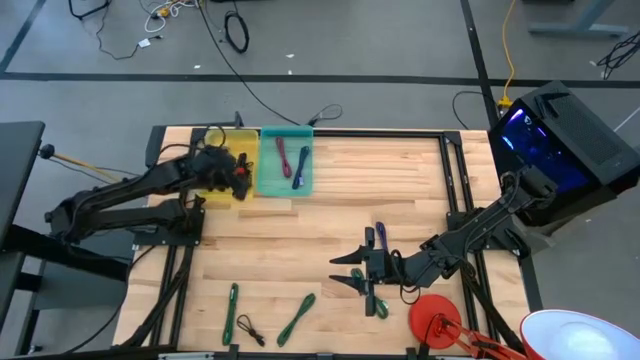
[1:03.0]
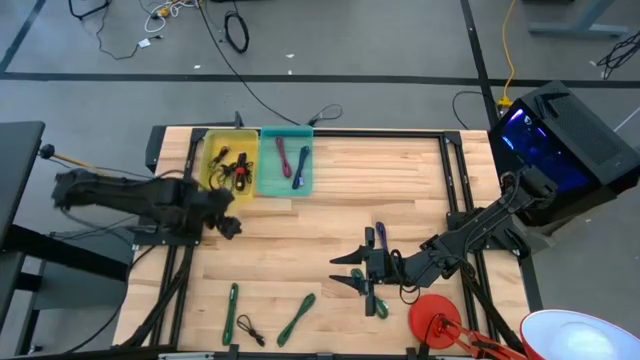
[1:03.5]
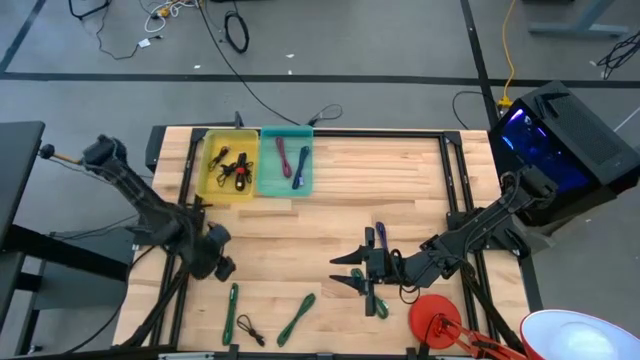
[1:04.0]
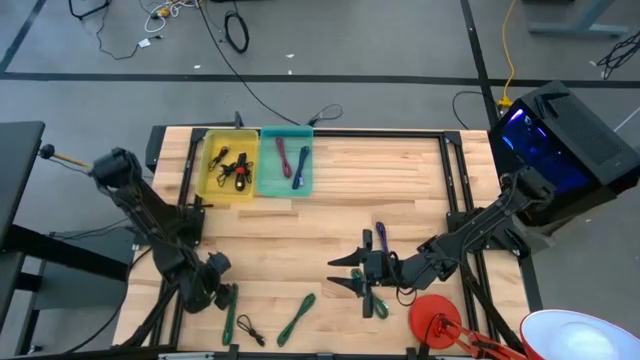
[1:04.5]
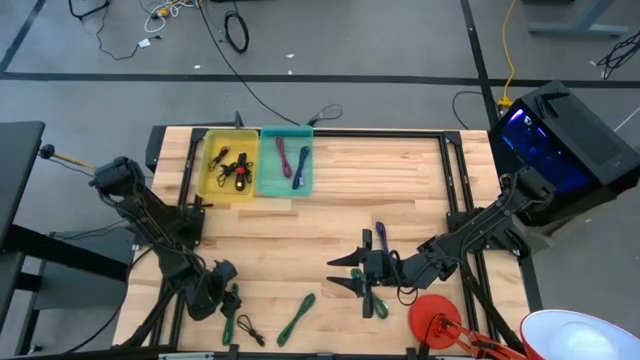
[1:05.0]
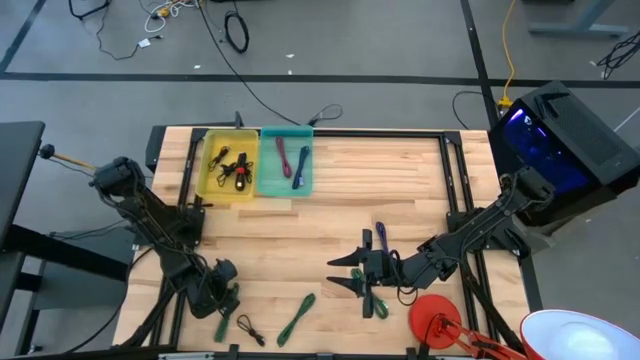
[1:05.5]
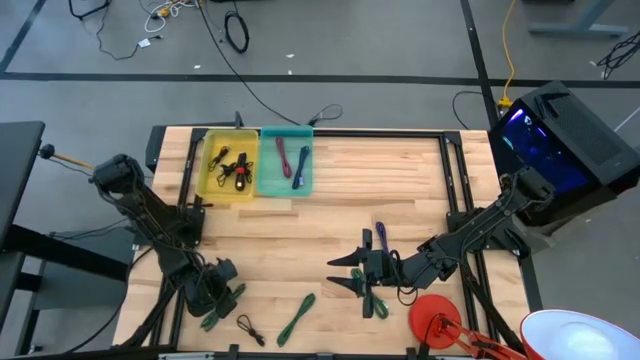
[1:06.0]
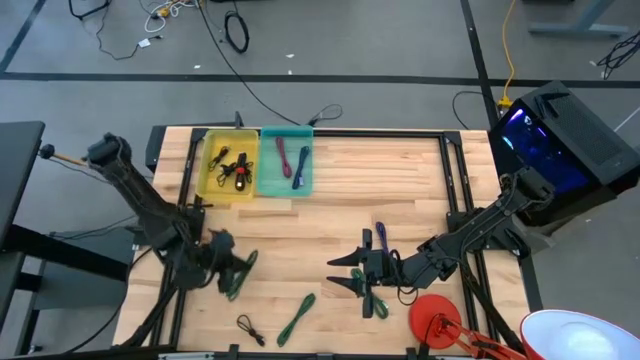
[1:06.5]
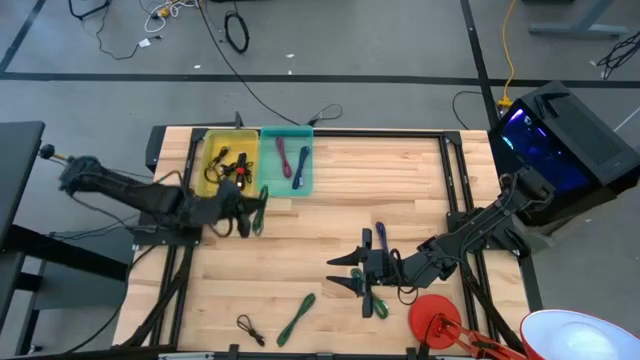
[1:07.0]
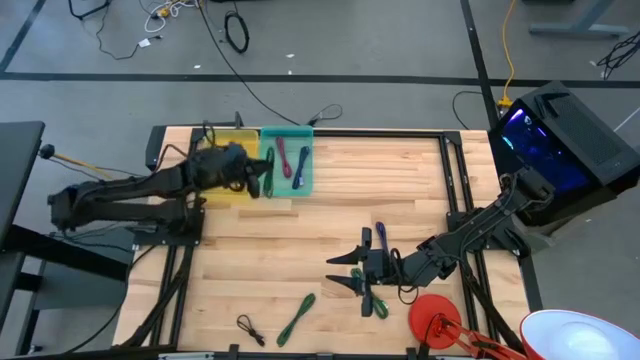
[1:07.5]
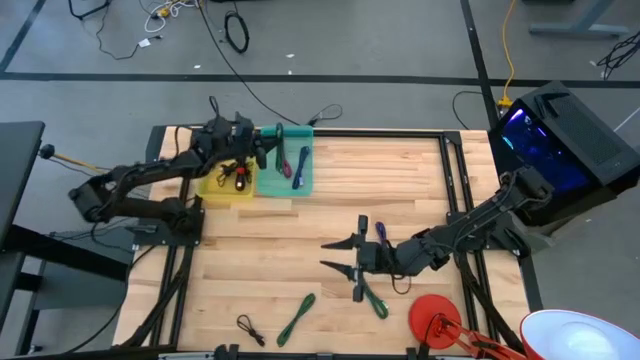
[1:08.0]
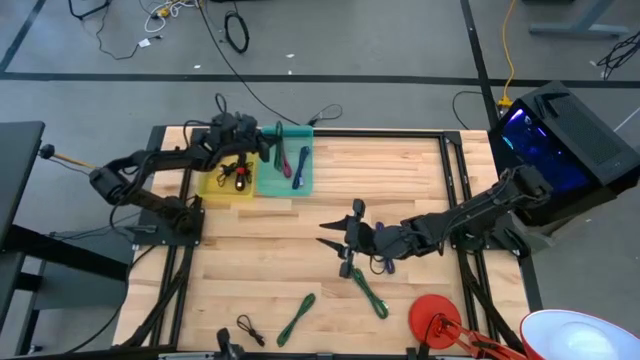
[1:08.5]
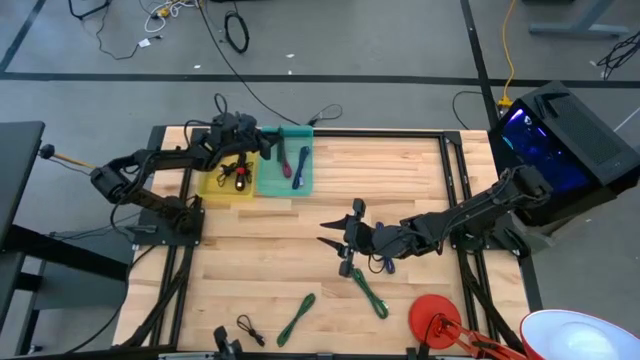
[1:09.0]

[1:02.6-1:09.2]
Task: Pick & Place USB Port
Put the green charger cable into the green bin

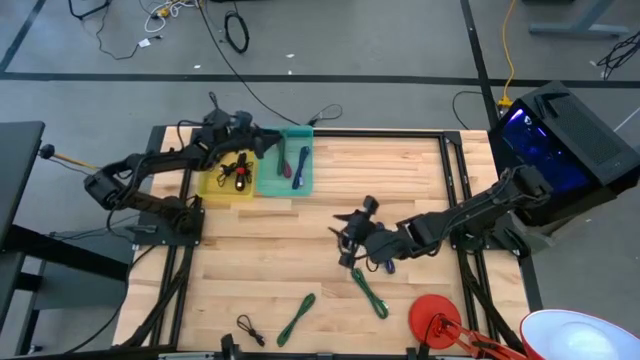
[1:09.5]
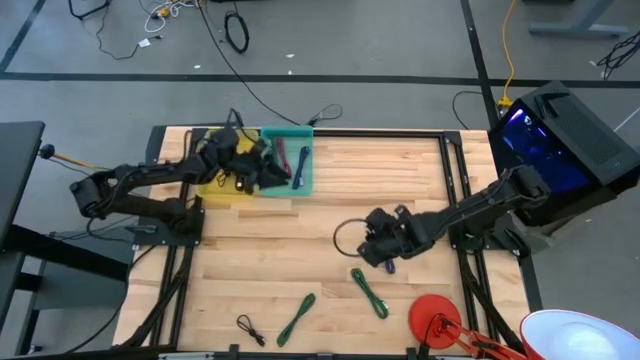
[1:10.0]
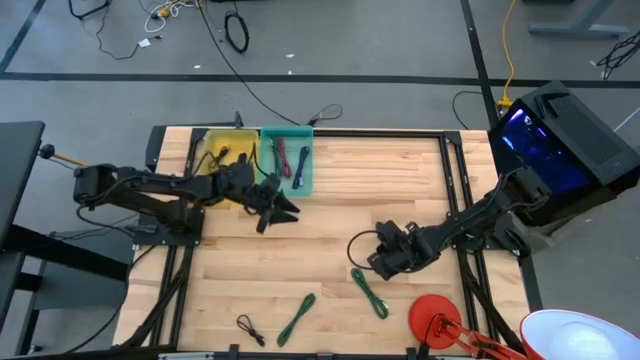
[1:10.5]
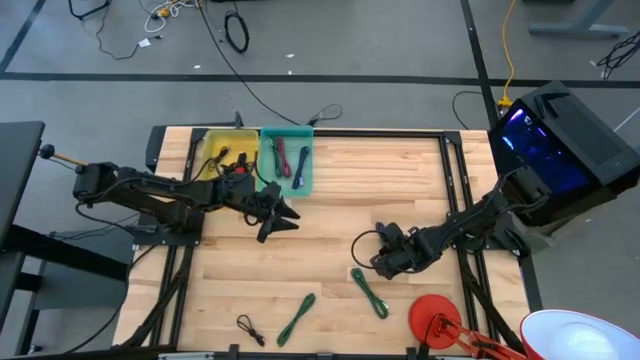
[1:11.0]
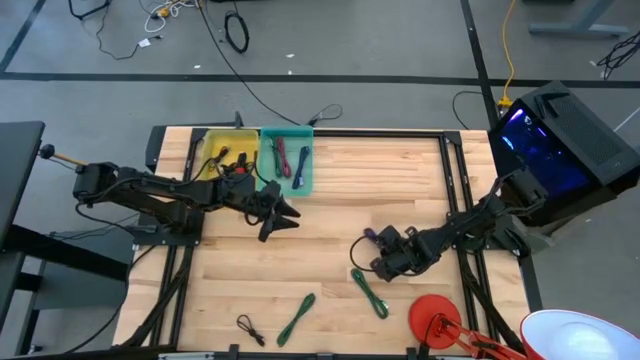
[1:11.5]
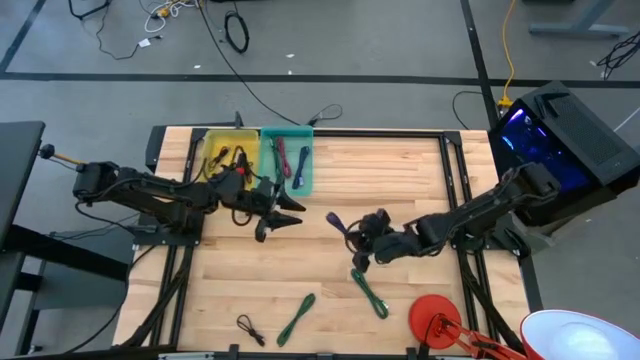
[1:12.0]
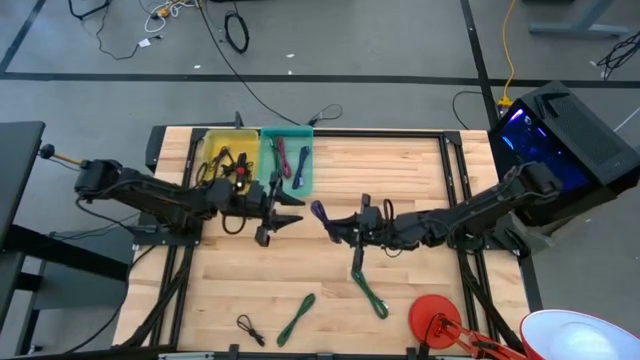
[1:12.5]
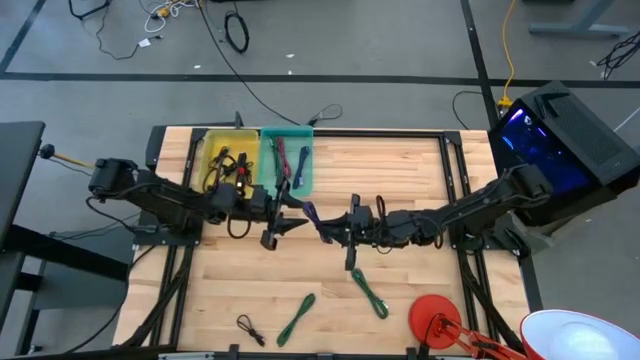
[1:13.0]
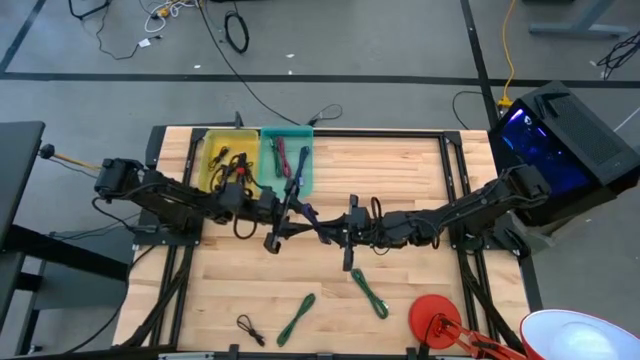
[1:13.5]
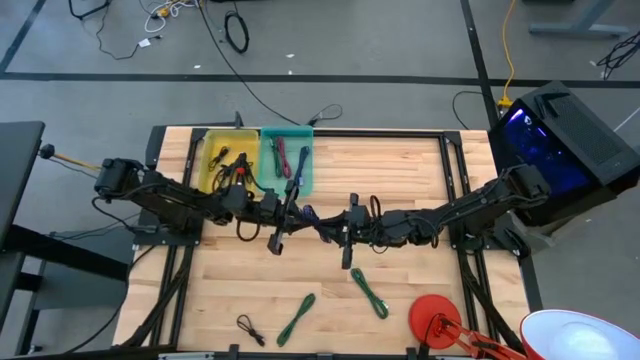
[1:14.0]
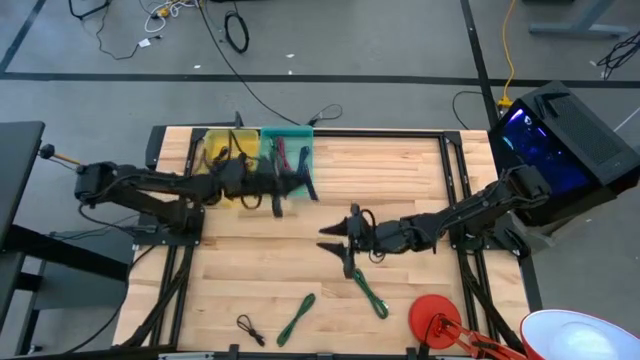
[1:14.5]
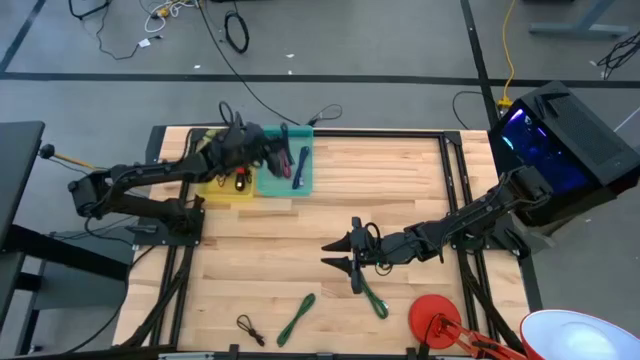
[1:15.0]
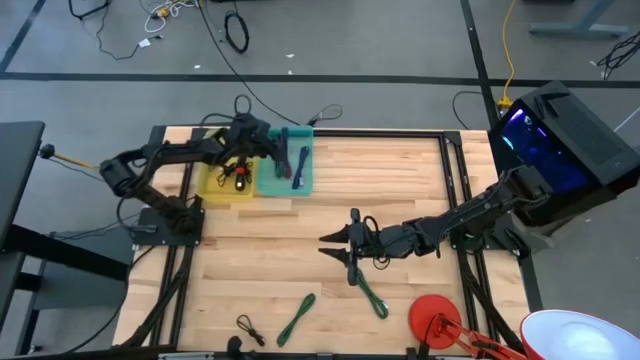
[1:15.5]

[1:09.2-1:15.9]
Put the purple charger cable into the green bin

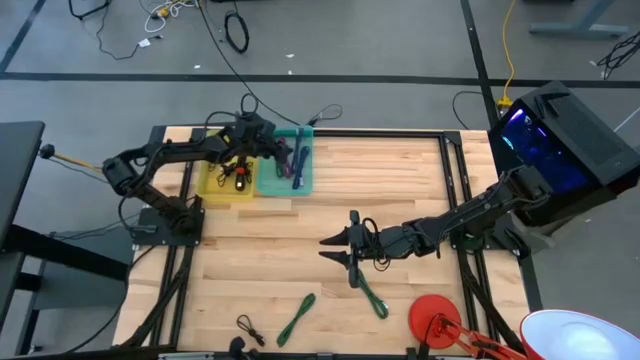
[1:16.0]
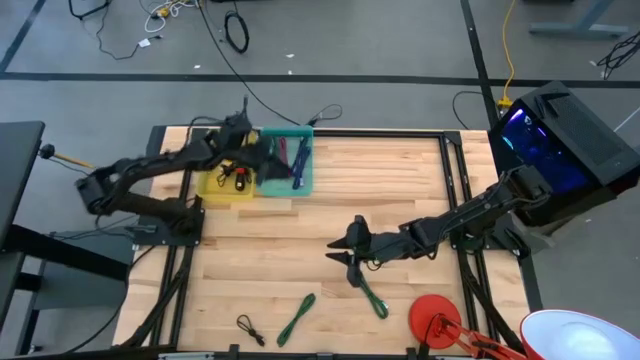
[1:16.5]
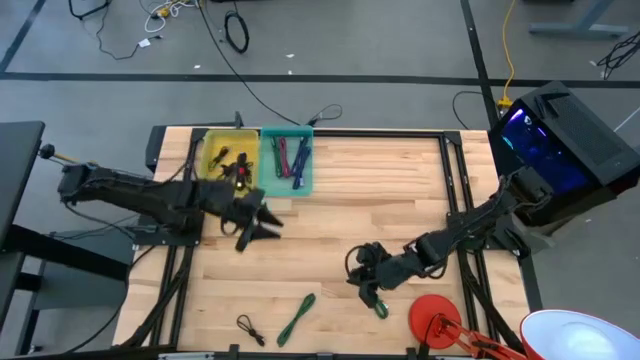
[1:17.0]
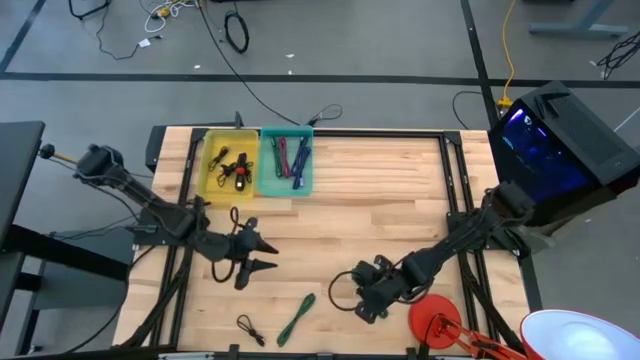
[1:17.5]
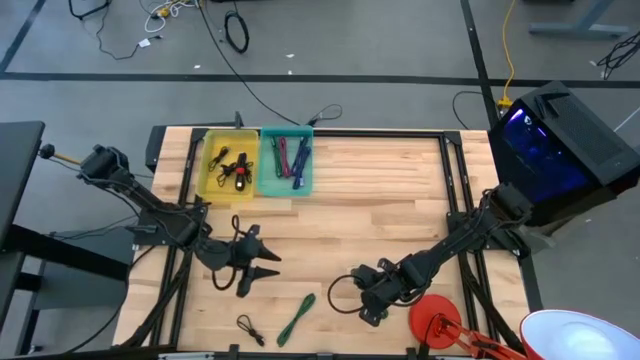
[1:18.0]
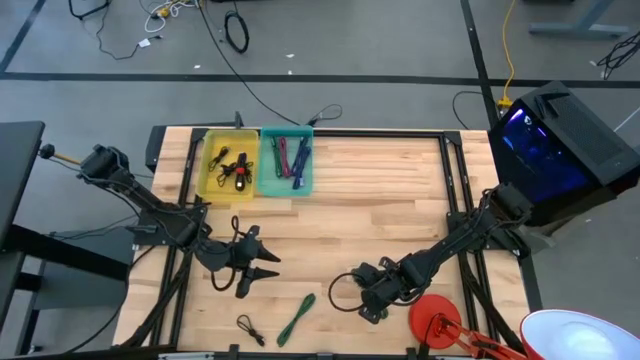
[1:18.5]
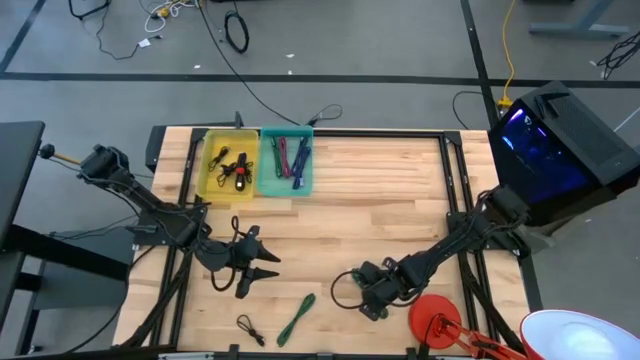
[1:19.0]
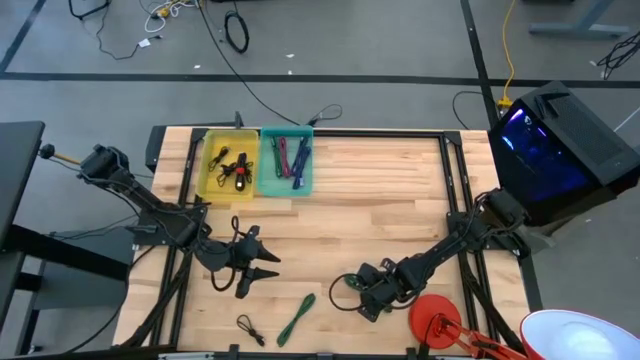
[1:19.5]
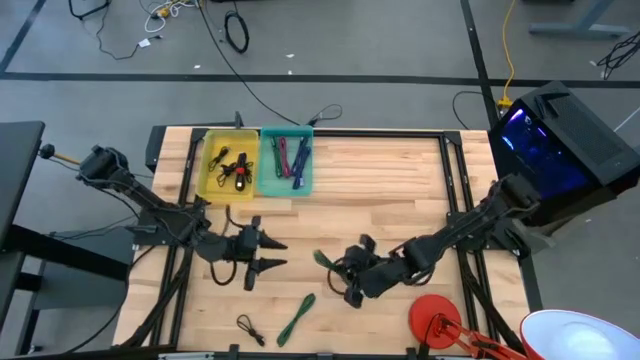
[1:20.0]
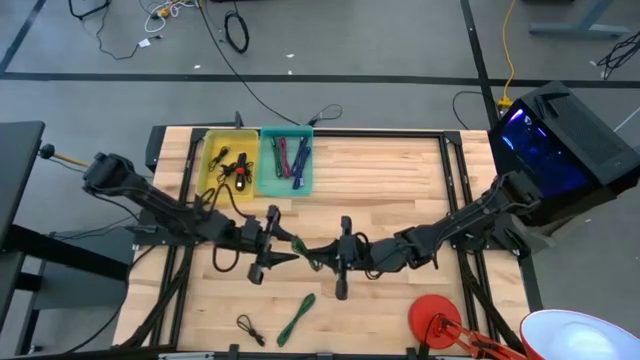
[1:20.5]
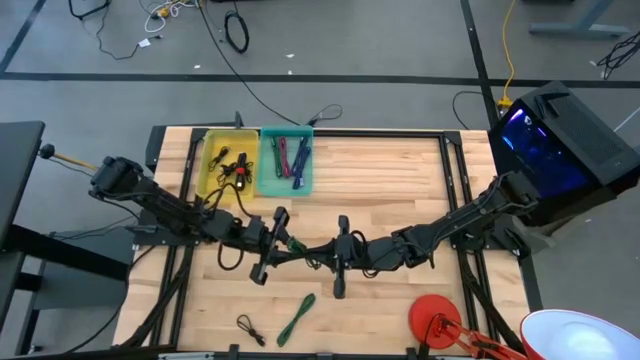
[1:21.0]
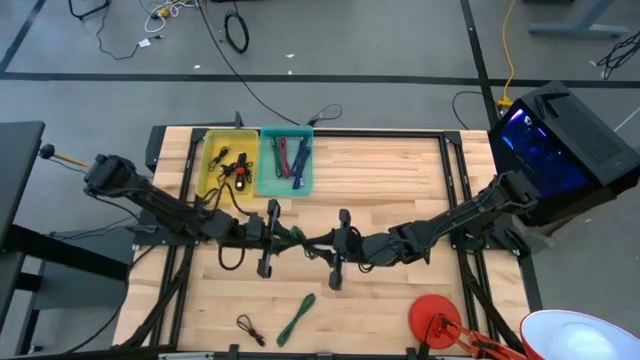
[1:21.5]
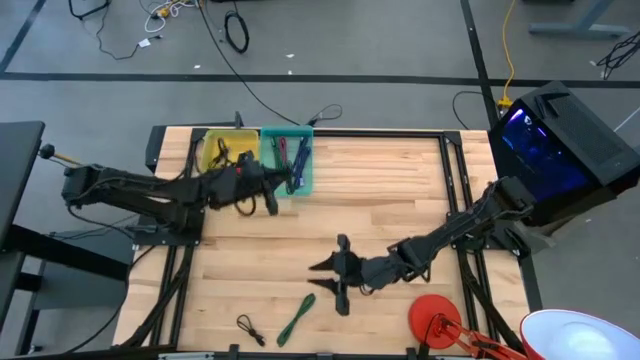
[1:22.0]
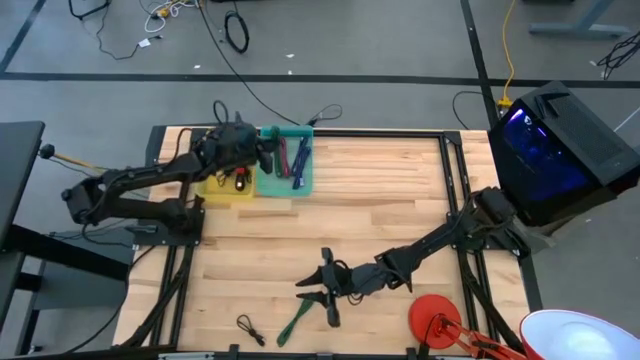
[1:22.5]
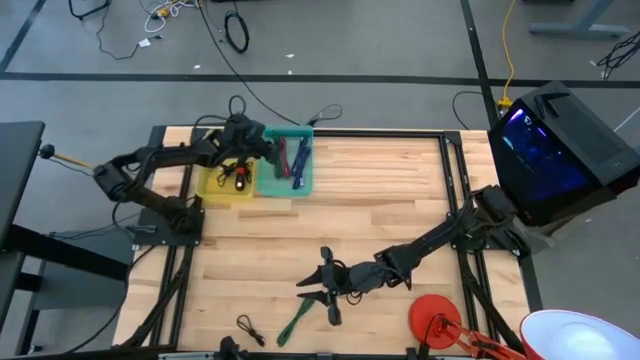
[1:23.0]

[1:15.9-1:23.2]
Put the green charger cable into the green bin

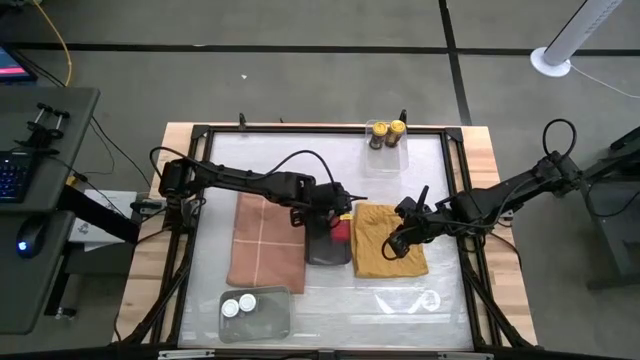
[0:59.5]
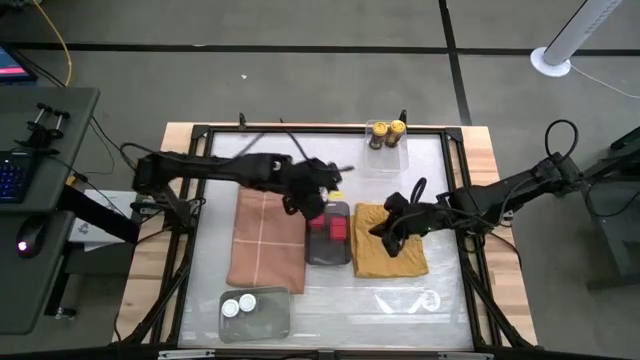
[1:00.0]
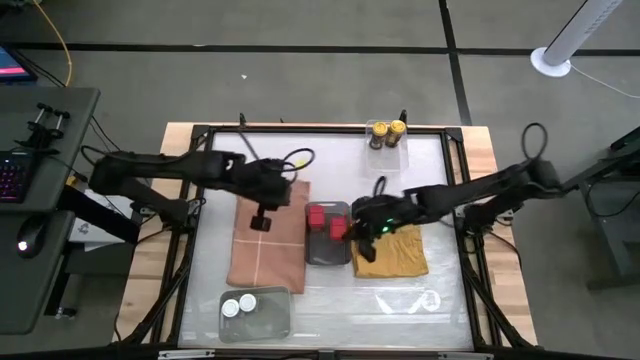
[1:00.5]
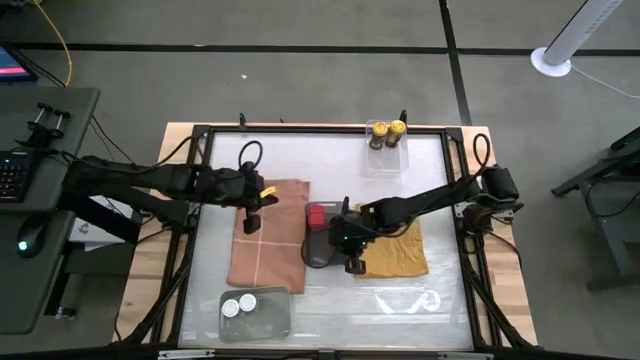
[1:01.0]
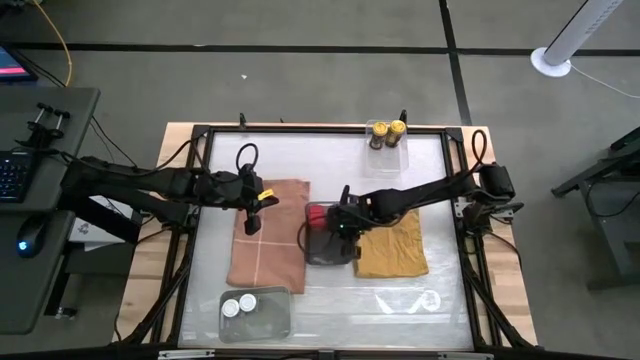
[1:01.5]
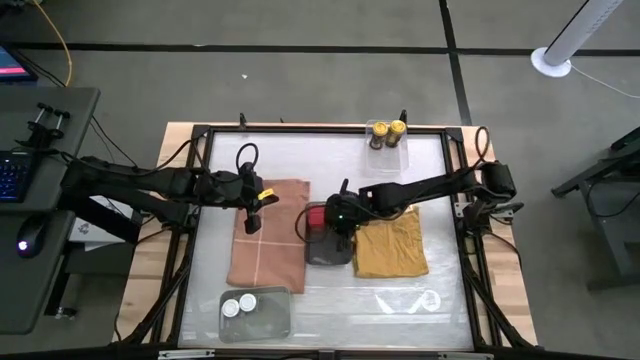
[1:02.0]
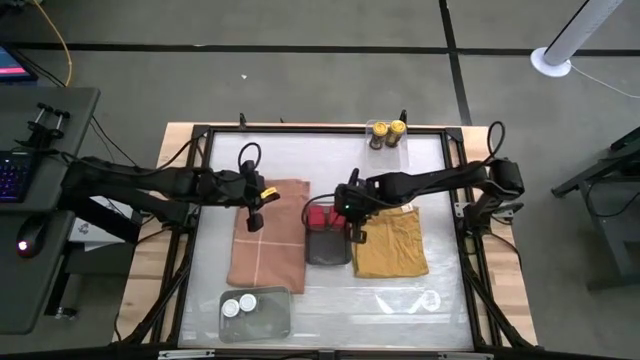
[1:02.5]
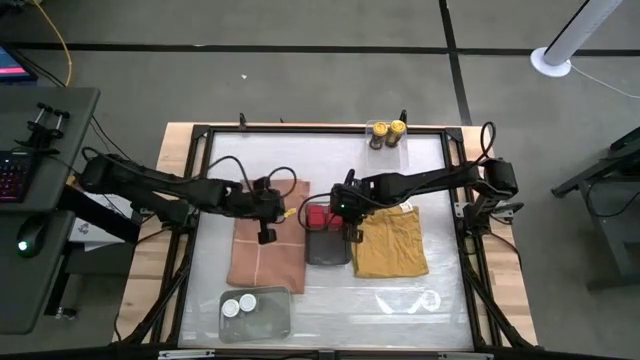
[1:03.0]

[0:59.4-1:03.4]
Task: Sort spices by type
Adjust the right red seasoning can in the black bin
